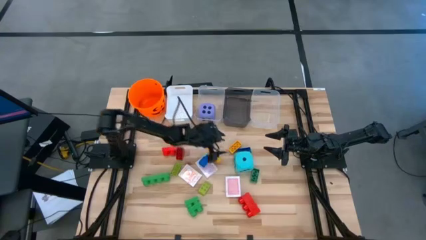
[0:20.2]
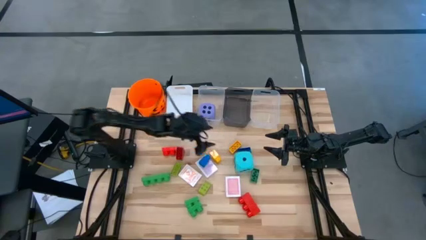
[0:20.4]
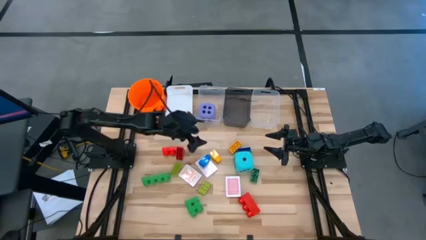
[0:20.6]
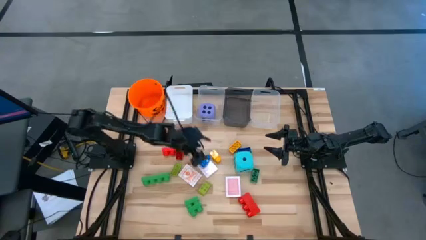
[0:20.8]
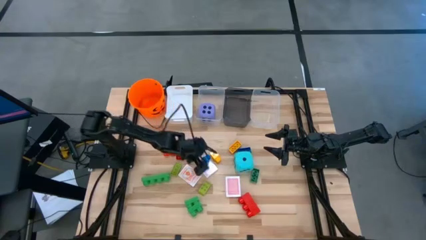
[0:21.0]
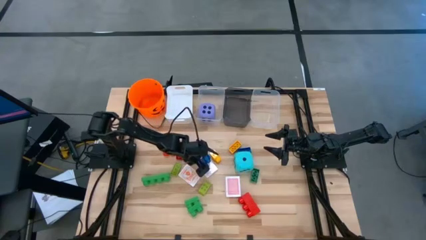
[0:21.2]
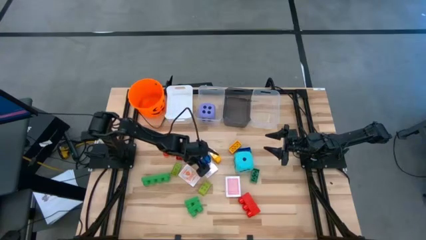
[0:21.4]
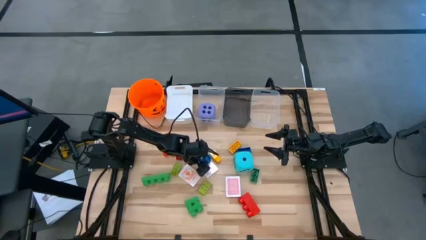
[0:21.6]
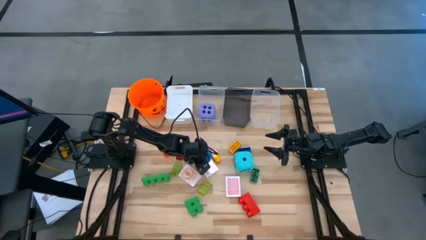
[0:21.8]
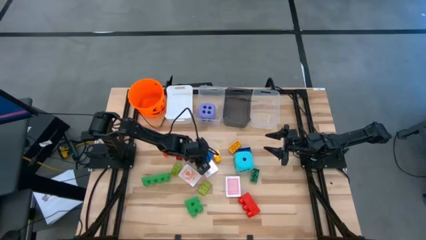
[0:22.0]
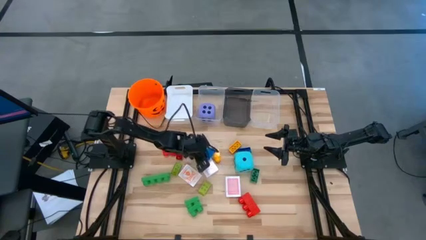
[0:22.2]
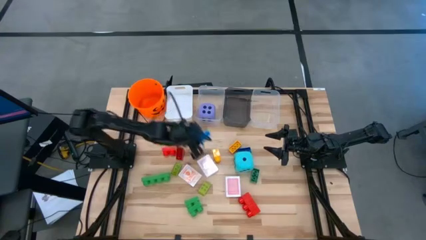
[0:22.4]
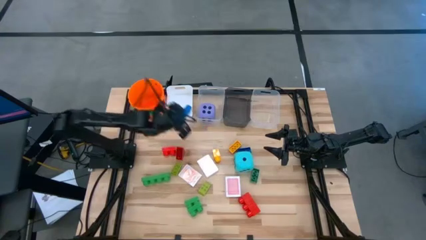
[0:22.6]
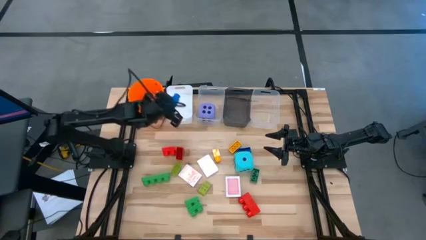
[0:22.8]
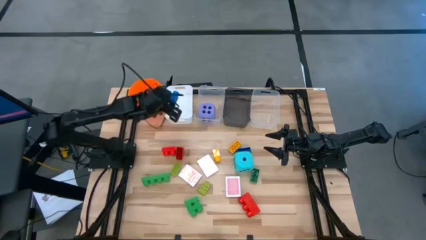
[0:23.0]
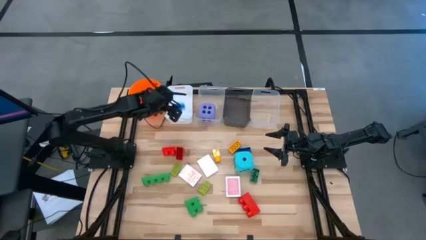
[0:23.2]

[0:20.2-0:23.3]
Task: Pick & Place Toys
Put the left blue game piece into the white bin

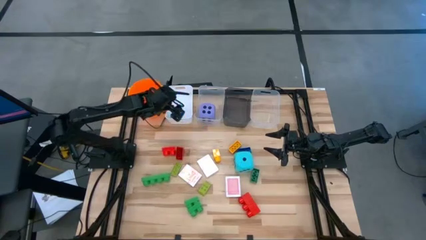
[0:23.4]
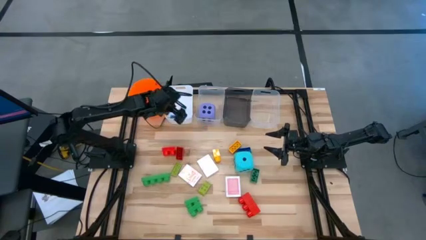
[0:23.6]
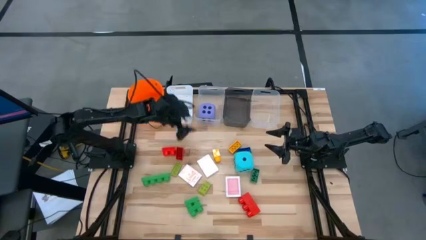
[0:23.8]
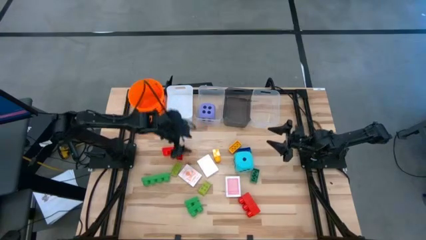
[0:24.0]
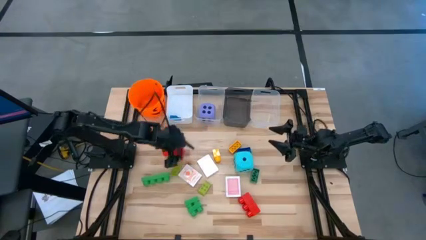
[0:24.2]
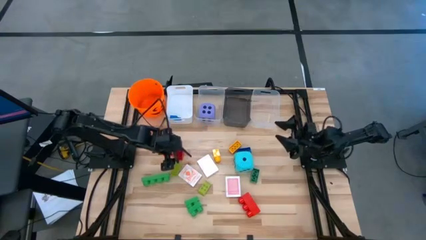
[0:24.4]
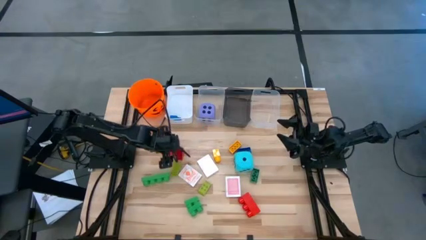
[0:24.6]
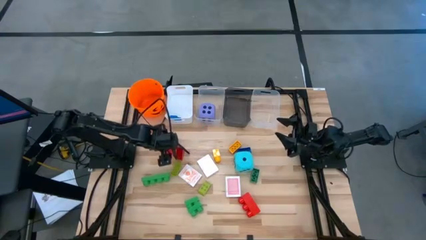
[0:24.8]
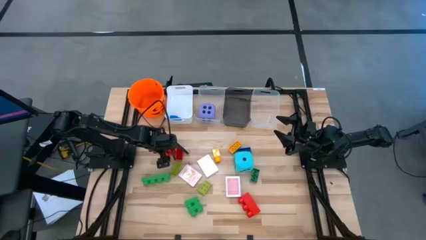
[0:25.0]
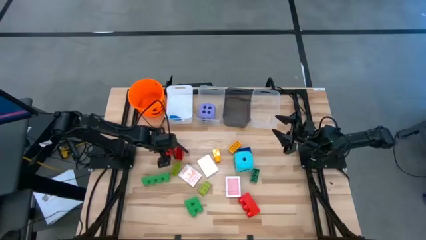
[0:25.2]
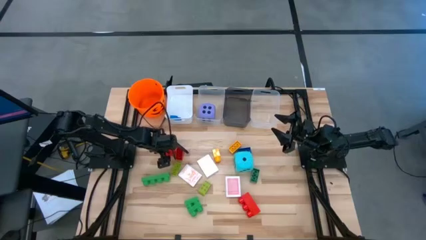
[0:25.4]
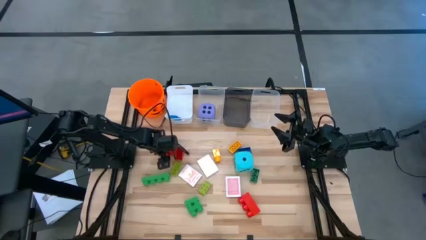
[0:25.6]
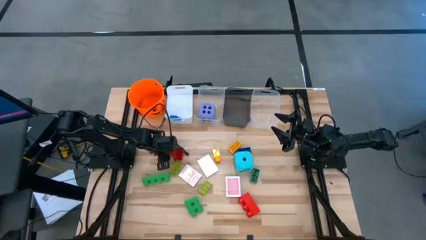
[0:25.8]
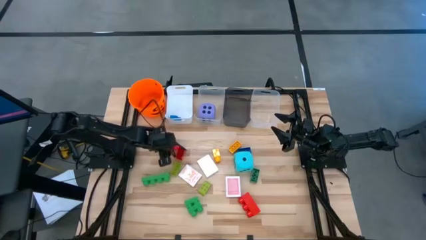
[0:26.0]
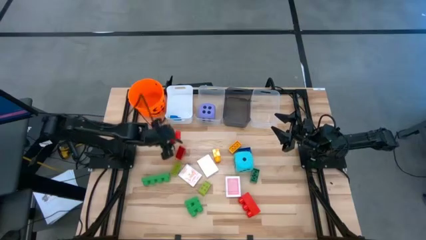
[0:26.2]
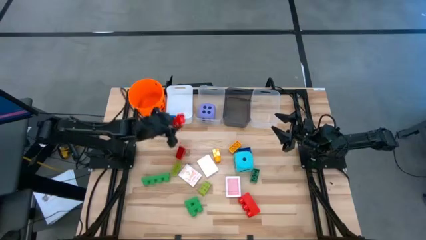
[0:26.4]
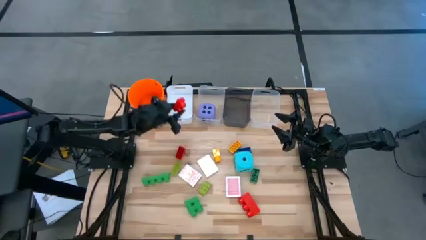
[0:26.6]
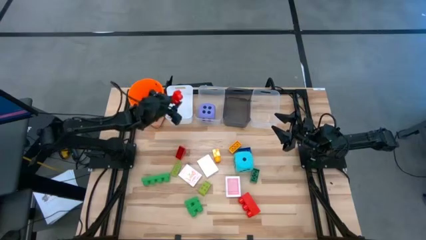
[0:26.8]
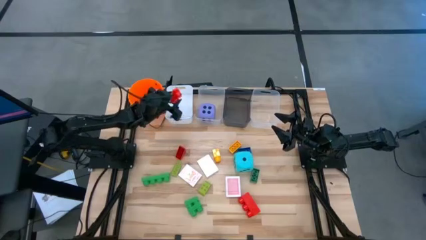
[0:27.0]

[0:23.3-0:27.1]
Put the left red game piece into the white bin

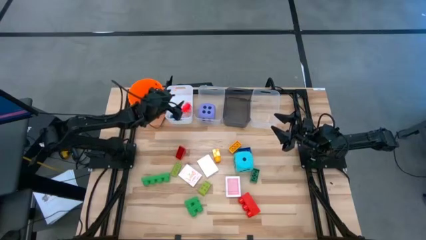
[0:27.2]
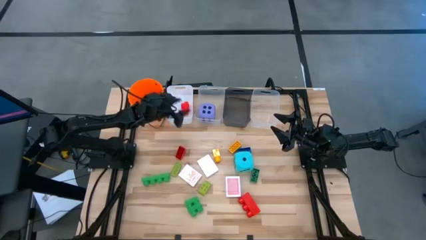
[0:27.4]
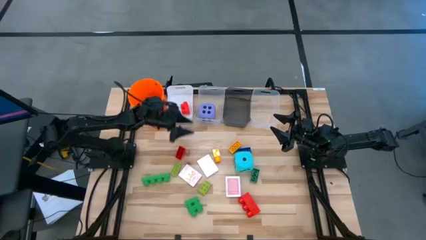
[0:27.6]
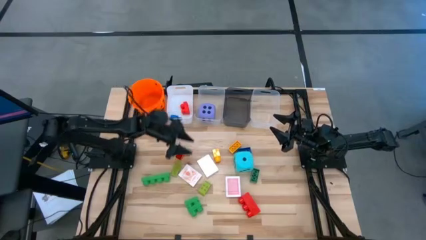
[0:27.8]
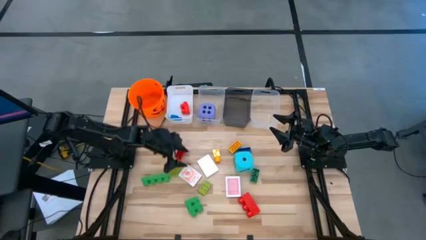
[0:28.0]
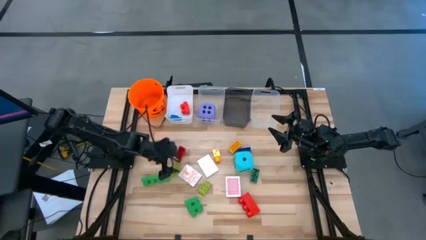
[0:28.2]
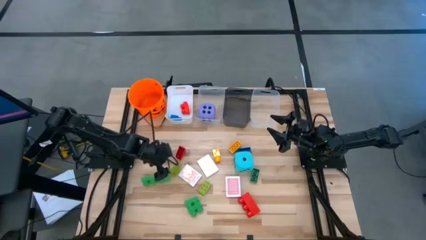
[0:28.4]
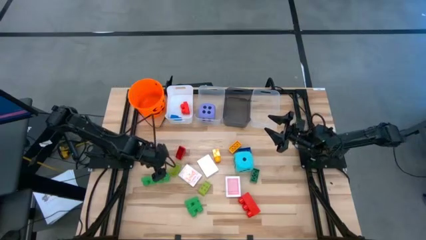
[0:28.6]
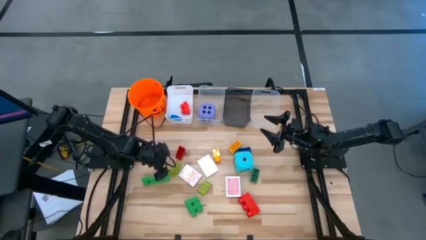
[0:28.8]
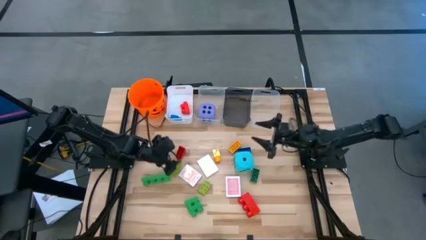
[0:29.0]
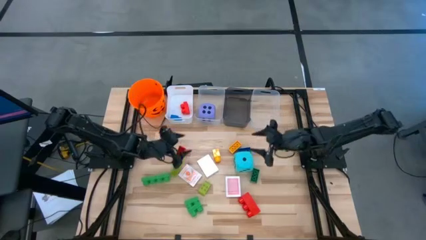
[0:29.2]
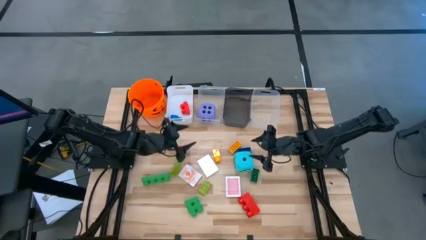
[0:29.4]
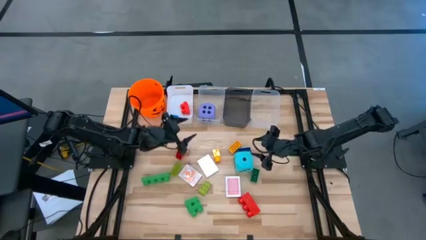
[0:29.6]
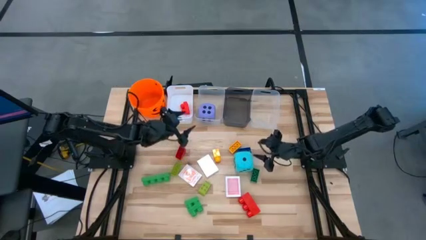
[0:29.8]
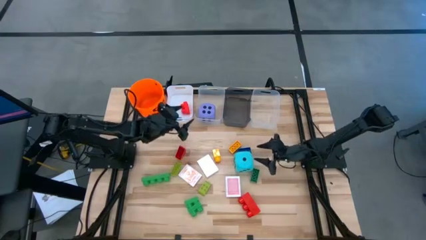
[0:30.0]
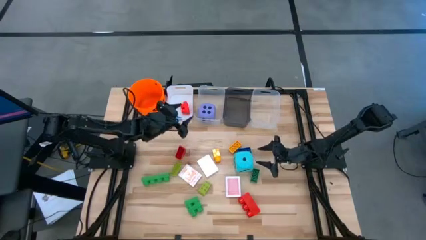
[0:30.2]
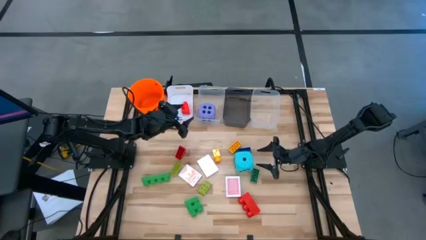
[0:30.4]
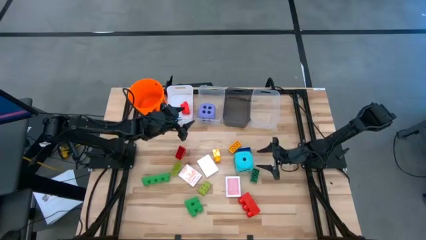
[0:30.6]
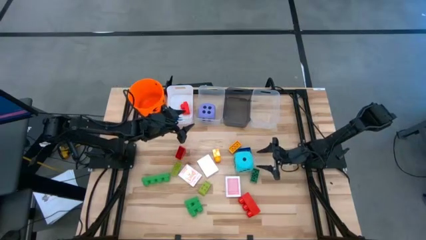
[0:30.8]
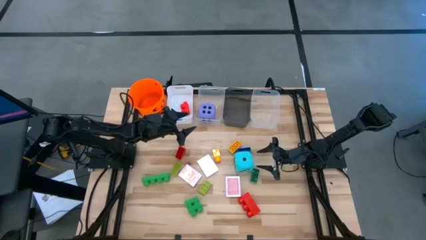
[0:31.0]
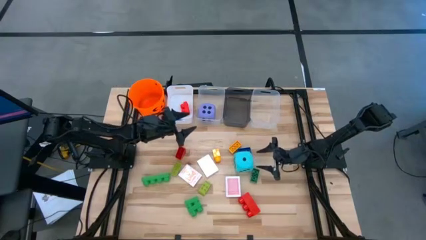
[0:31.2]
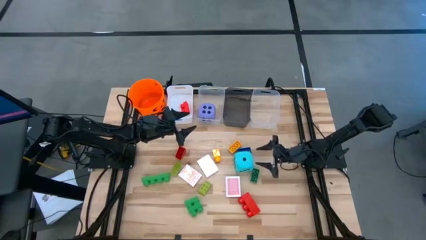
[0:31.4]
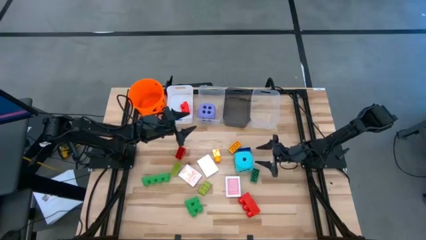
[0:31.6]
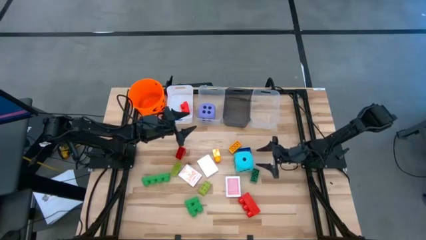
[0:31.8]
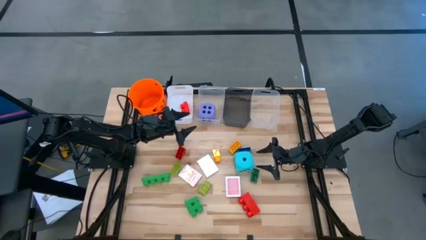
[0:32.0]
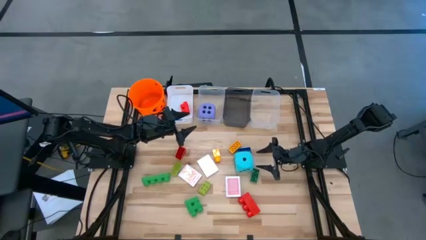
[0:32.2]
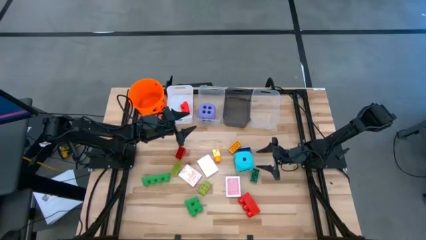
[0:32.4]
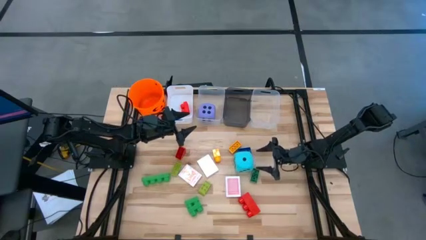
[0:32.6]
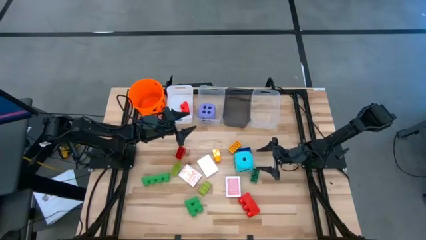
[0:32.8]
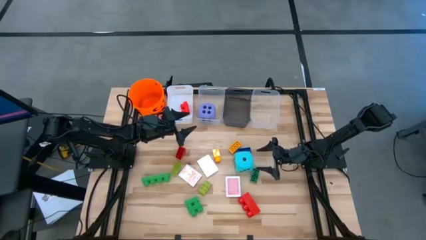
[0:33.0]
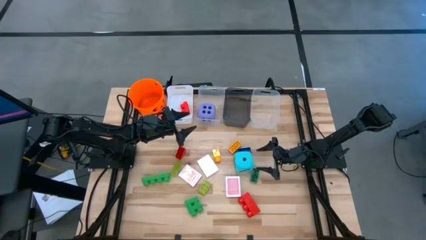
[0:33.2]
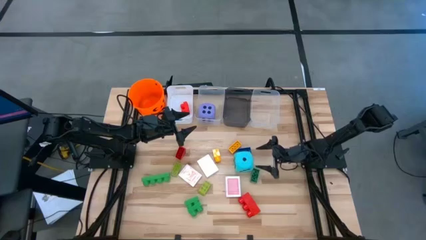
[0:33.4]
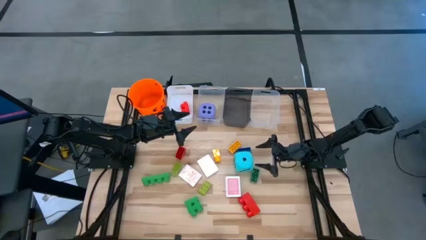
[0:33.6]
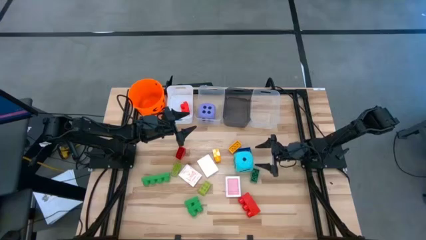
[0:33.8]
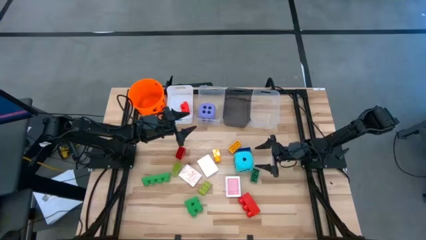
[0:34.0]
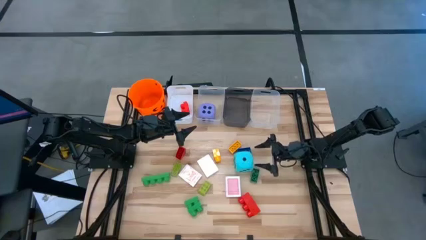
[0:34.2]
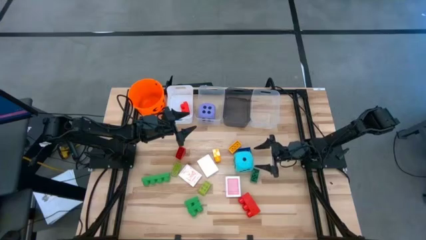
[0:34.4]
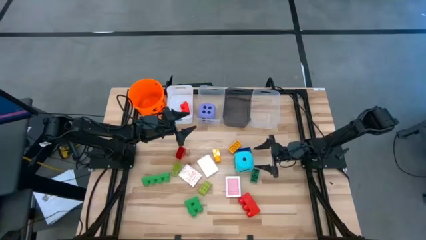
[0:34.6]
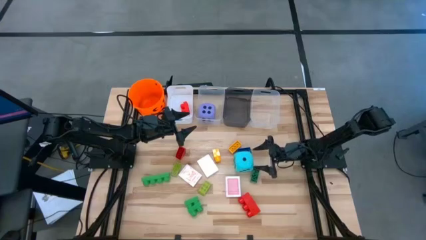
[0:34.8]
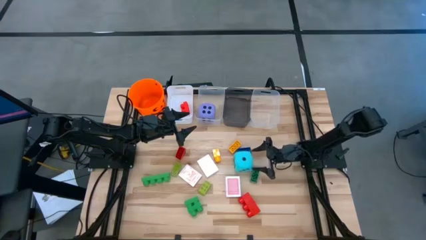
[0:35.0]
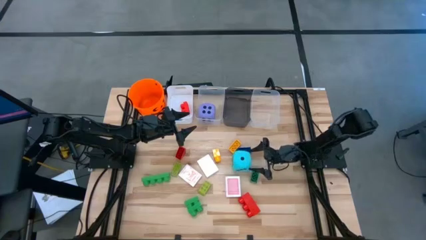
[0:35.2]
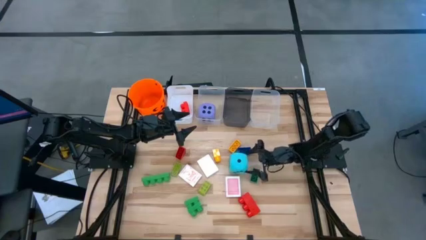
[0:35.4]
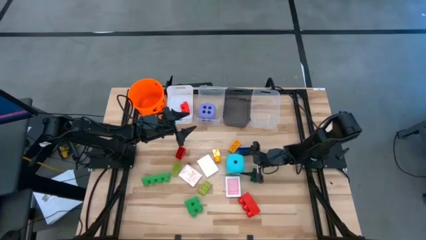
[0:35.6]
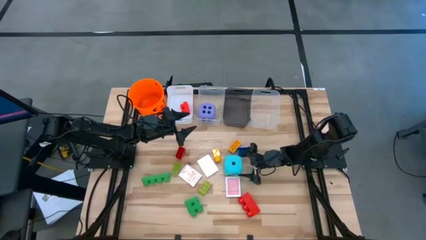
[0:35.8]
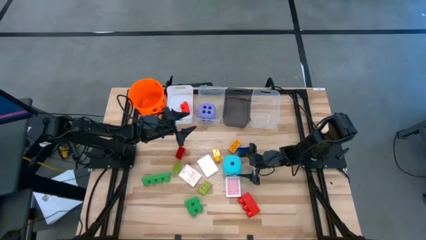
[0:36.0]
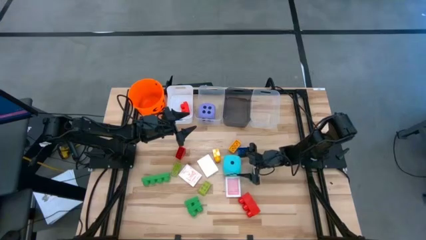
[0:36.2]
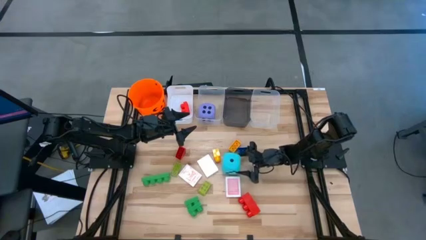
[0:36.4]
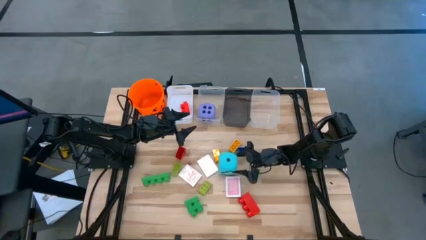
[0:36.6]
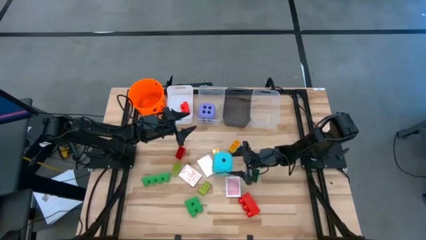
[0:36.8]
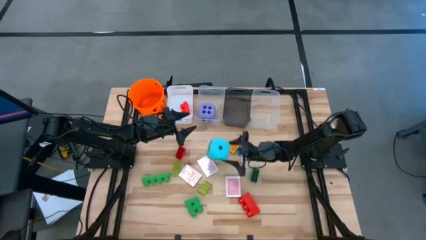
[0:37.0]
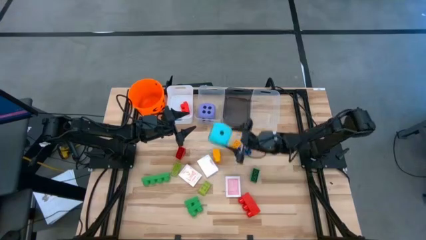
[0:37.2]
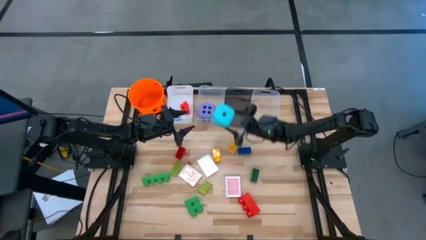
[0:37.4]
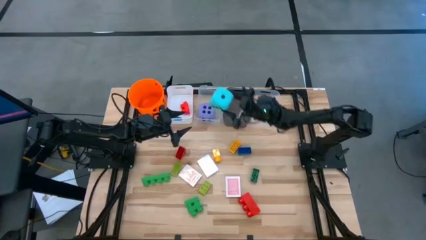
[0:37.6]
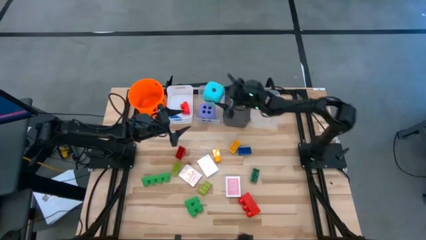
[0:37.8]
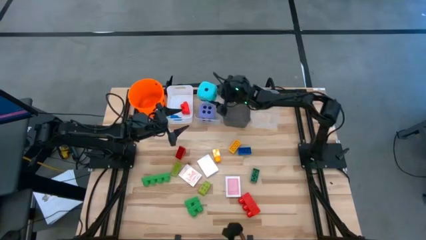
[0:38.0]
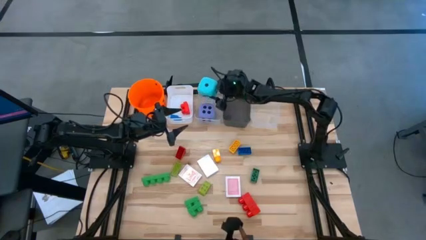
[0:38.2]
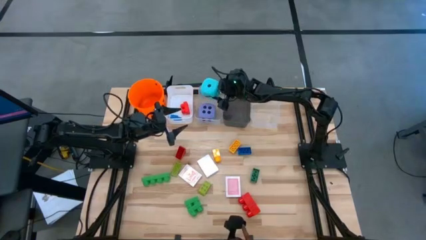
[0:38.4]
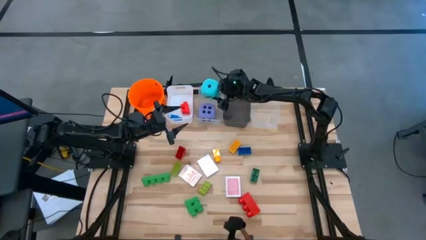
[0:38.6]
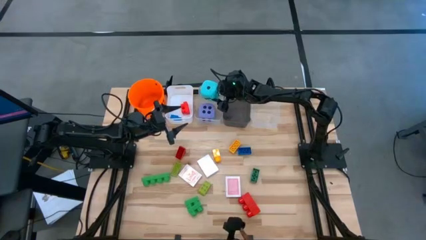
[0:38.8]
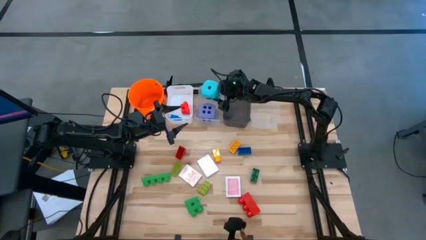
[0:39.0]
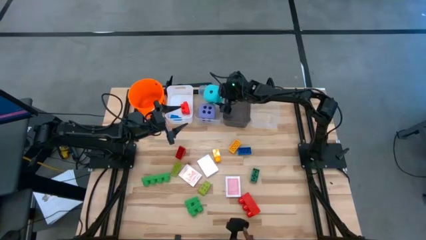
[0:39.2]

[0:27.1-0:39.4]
Put the blue dice into the left transparent bin
